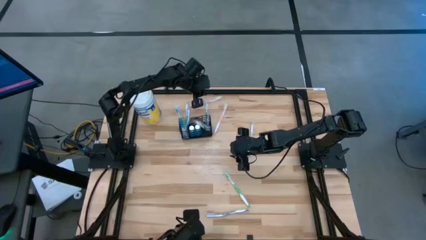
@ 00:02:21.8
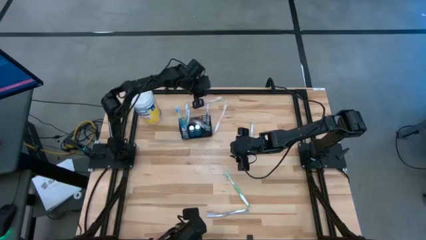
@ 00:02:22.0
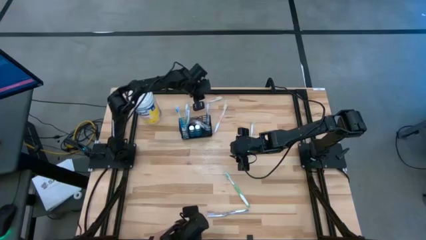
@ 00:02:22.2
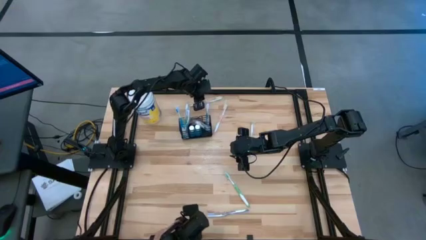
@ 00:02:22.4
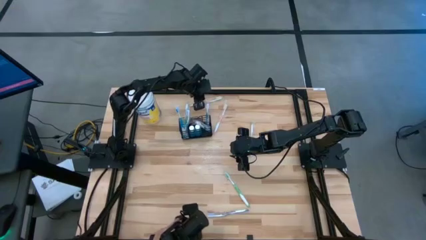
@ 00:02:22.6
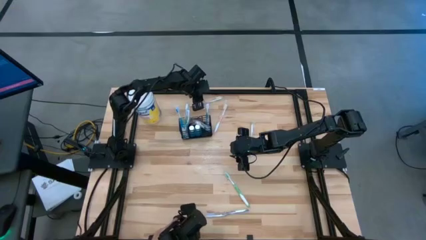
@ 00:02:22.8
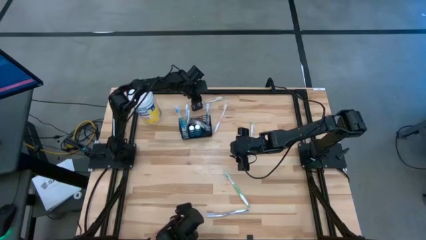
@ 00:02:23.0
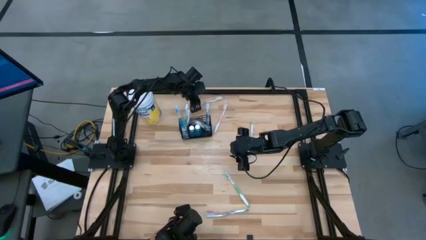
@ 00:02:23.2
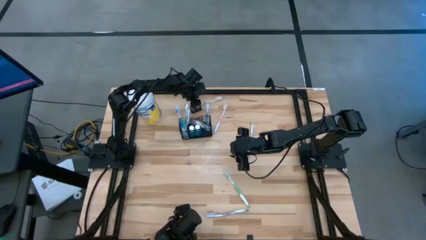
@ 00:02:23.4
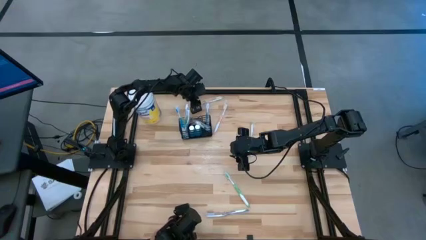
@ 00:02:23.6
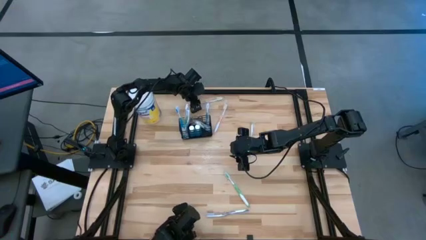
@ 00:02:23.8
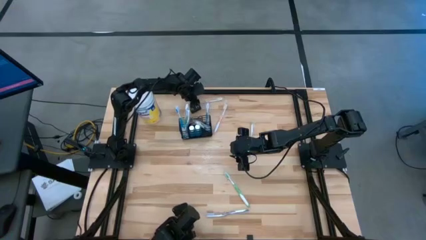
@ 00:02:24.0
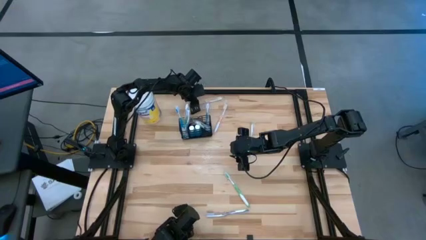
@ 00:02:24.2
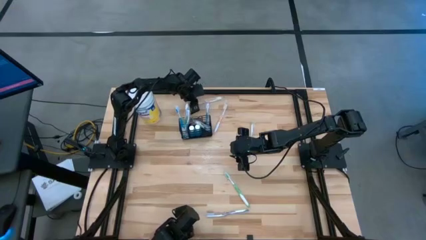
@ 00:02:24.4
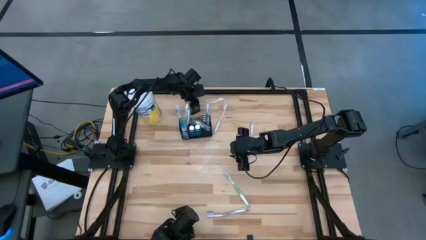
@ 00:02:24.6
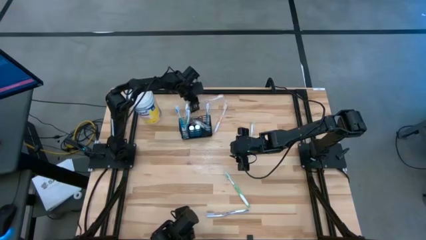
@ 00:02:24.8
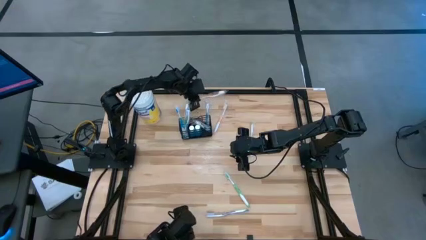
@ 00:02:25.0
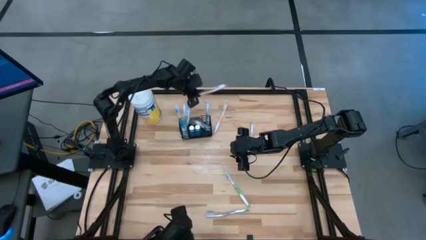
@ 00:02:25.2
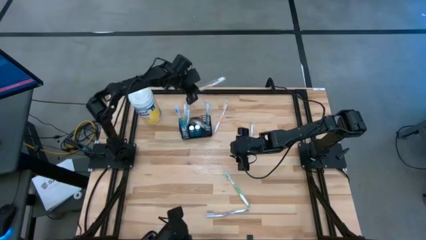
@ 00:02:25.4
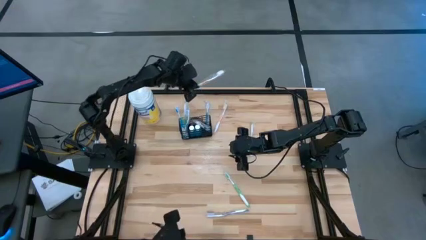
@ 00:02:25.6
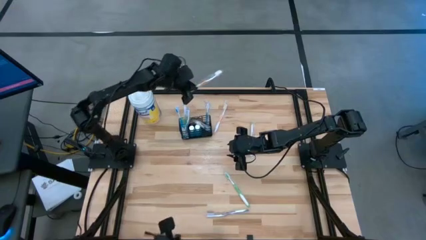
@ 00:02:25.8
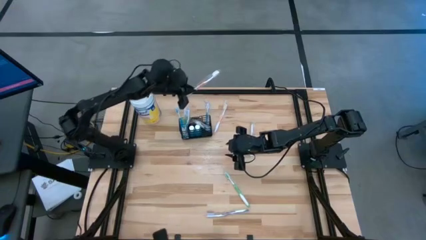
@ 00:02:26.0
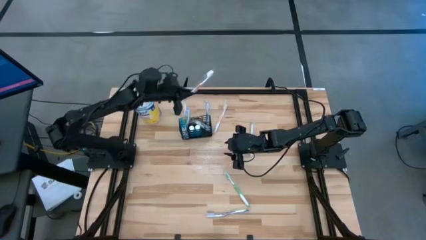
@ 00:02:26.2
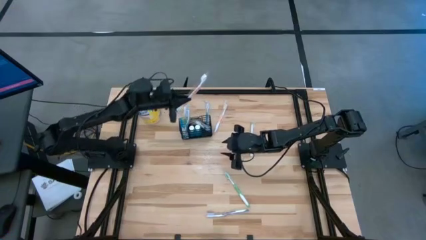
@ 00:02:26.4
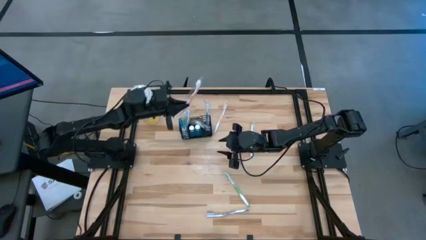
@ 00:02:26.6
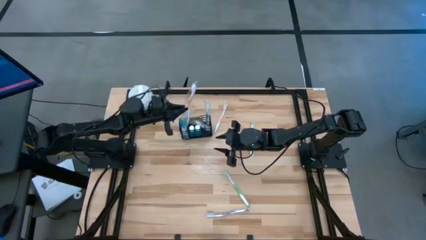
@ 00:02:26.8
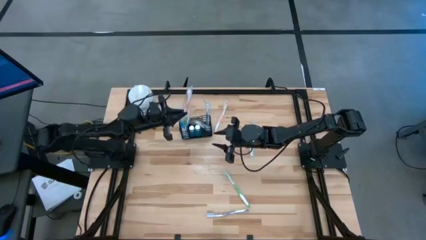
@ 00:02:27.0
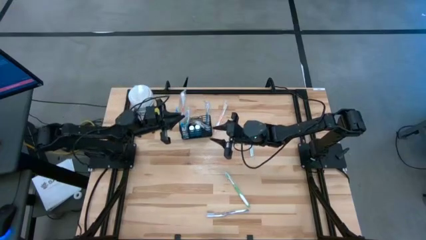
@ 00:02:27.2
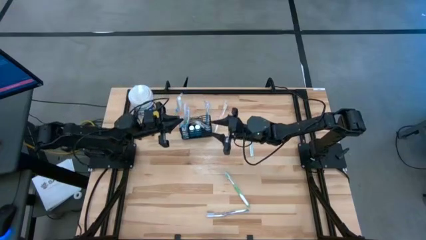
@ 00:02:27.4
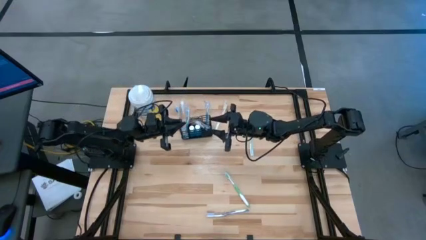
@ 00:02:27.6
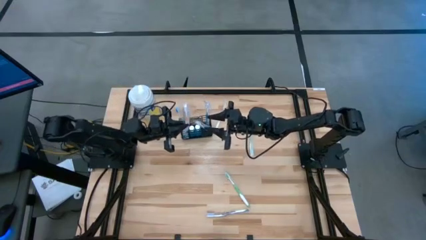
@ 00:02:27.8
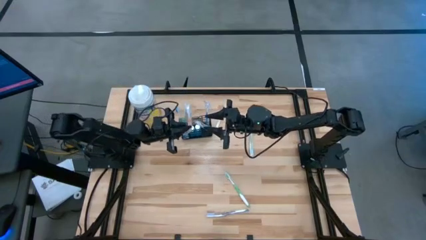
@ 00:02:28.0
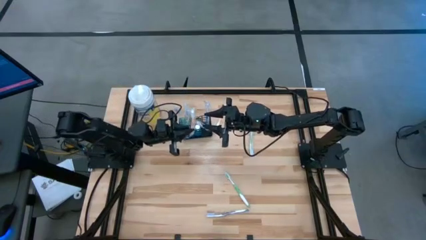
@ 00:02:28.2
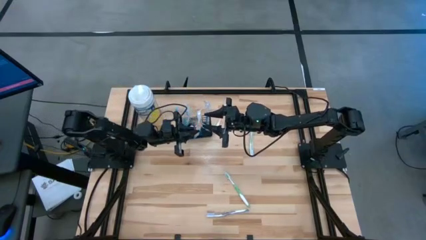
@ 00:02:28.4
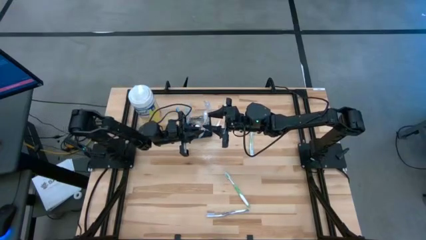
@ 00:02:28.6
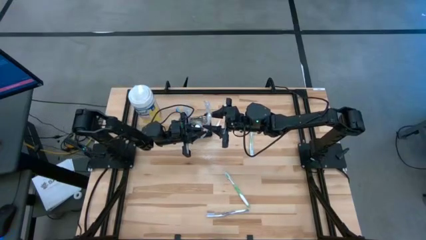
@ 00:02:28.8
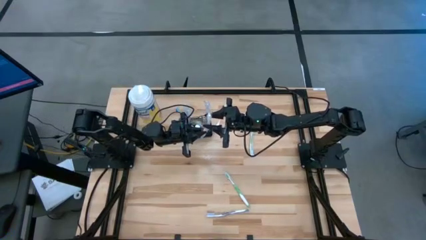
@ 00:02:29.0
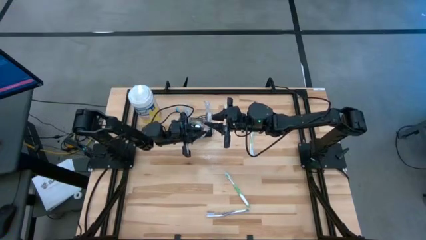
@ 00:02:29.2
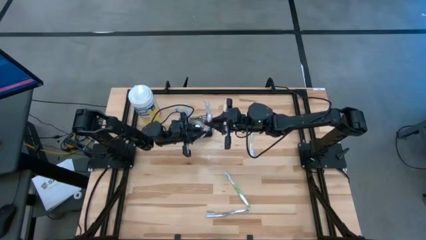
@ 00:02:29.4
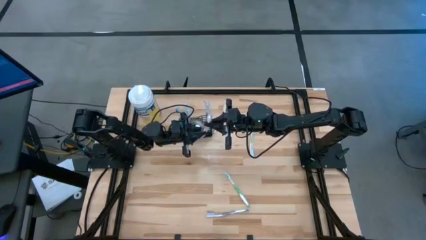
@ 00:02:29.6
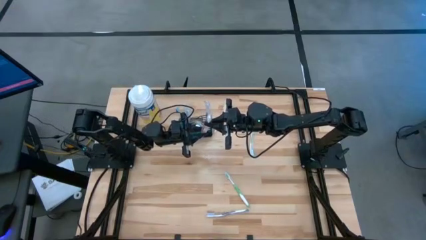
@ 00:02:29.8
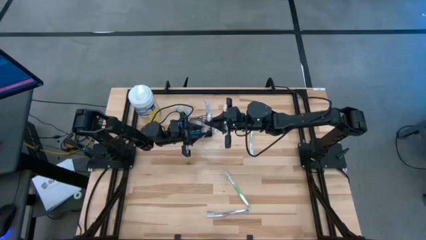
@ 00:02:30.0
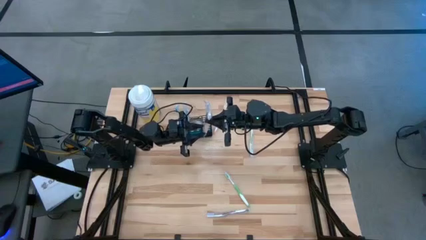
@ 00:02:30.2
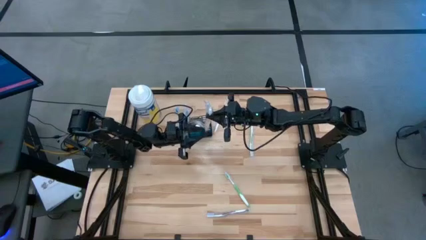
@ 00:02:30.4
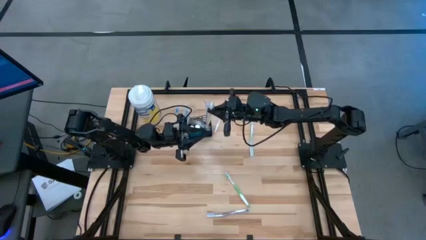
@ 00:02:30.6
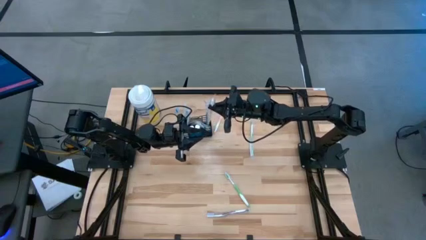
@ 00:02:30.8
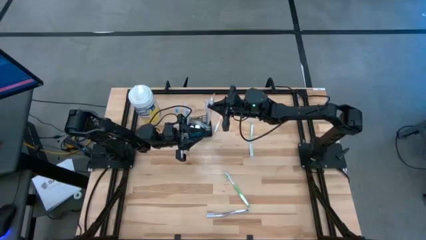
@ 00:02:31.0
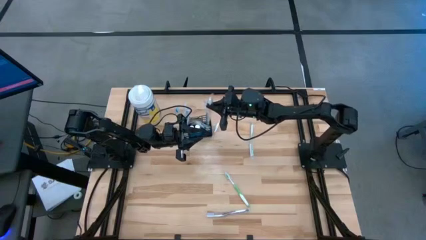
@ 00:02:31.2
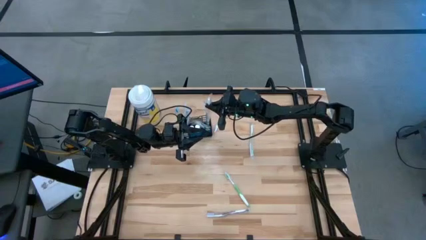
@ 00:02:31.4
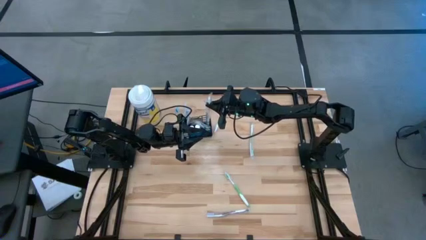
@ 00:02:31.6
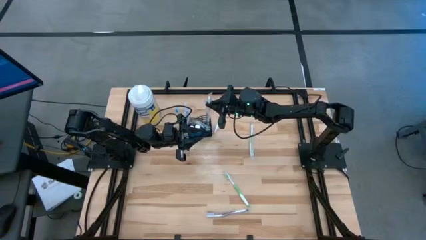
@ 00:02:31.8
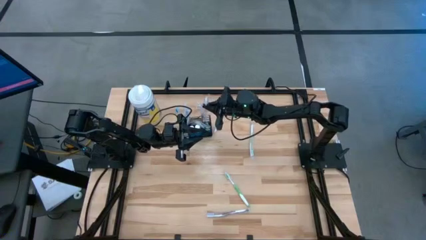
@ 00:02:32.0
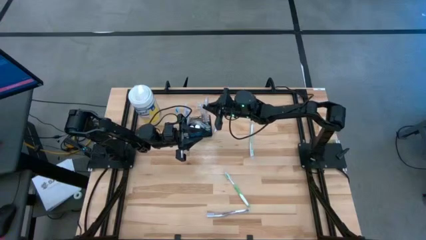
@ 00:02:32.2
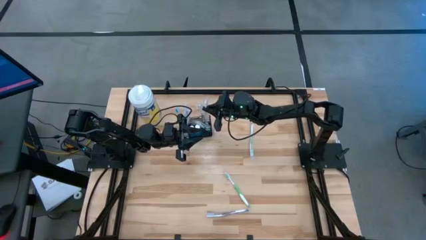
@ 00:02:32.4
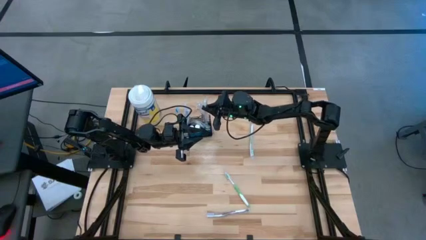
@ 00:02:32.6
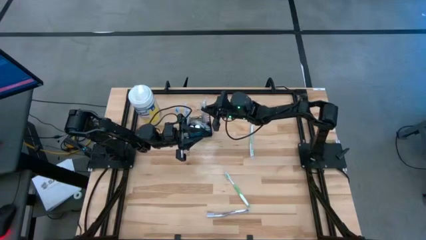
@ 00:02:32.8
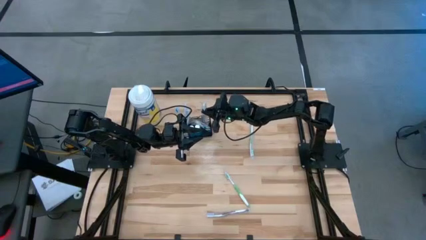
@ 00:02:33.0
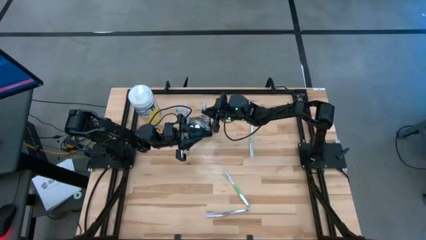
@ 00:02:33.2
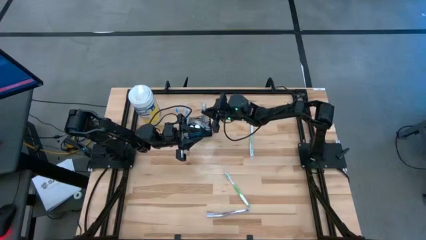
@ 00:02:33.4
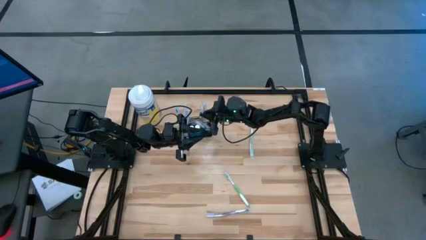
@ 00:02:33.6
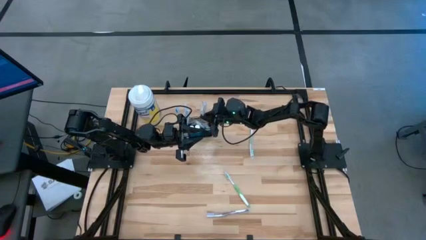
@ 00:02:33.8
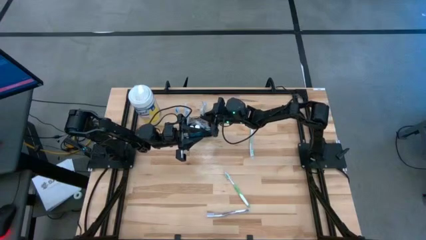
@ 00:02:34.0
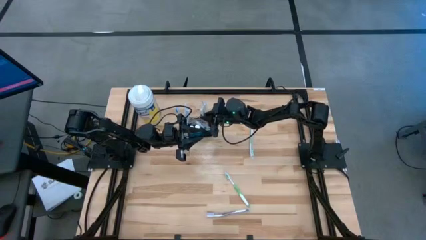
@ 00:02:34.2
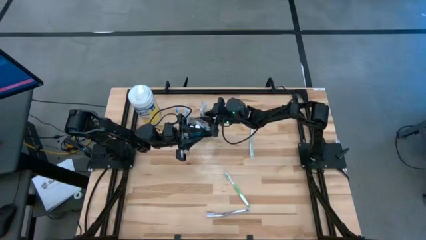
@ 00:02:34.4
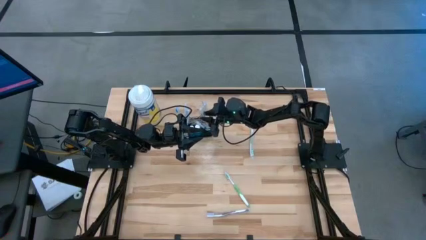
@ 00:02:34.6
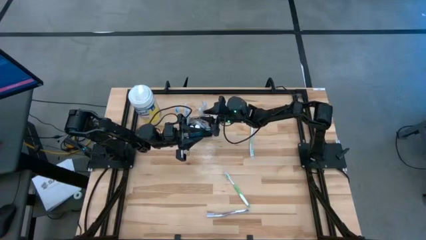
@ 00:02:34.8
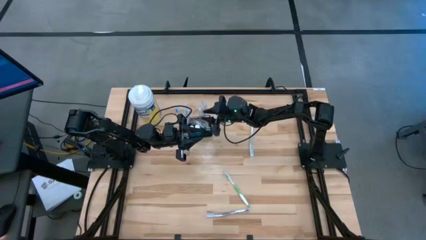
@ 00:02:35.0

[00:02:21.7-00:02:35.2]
Task: Pick & Place toothbrushing station
Put the right orange toothbrush into the mesh organizer
